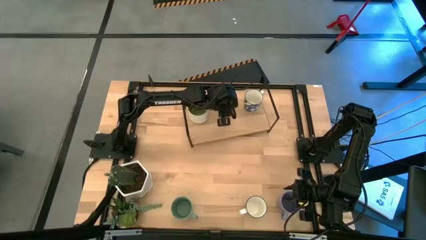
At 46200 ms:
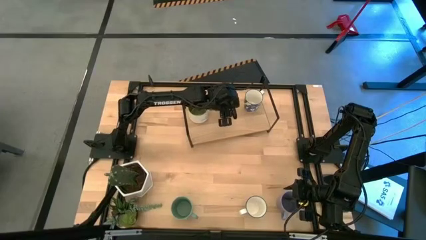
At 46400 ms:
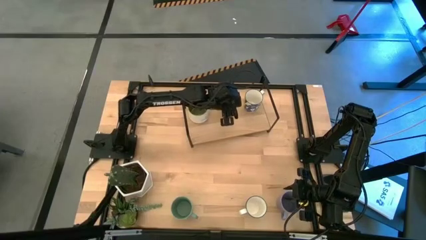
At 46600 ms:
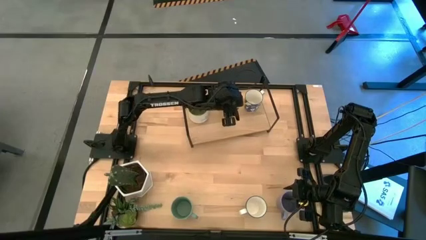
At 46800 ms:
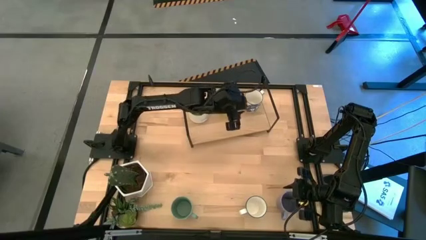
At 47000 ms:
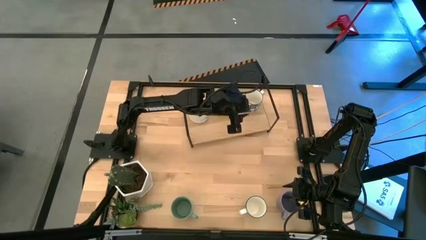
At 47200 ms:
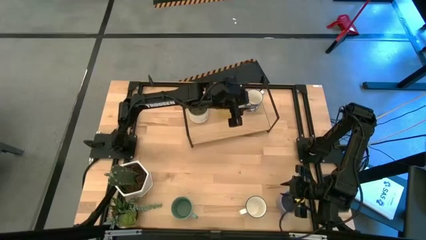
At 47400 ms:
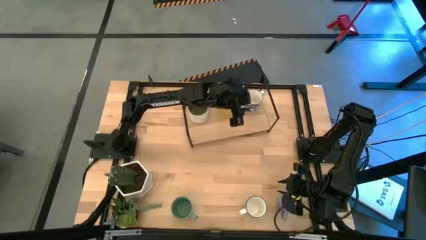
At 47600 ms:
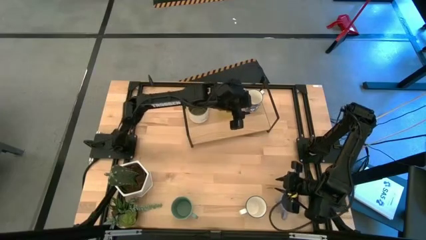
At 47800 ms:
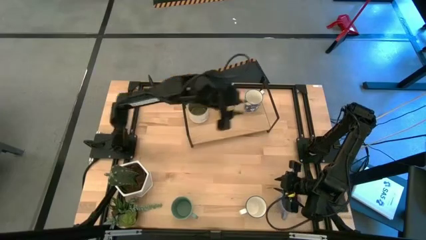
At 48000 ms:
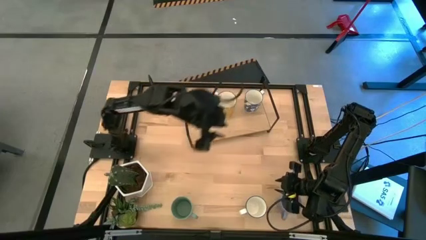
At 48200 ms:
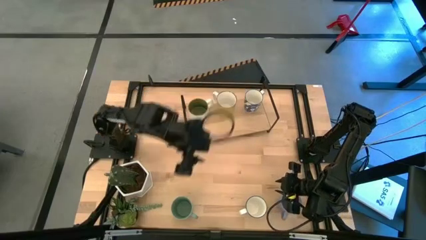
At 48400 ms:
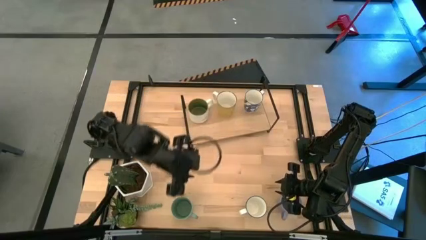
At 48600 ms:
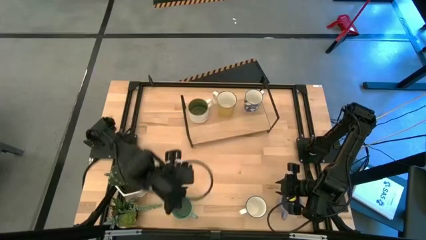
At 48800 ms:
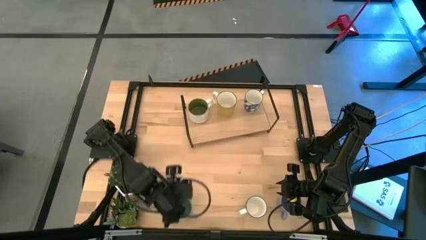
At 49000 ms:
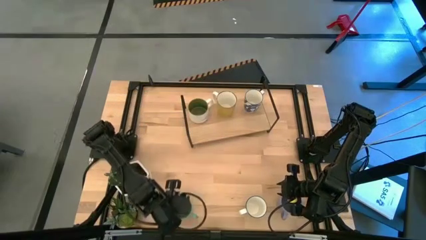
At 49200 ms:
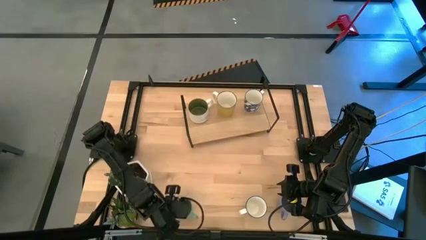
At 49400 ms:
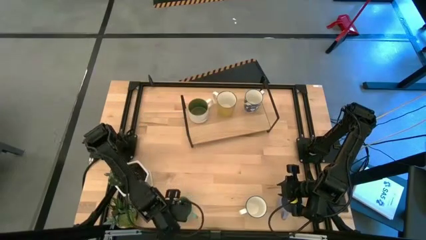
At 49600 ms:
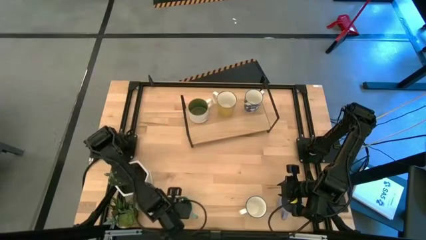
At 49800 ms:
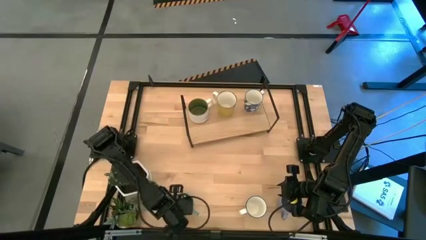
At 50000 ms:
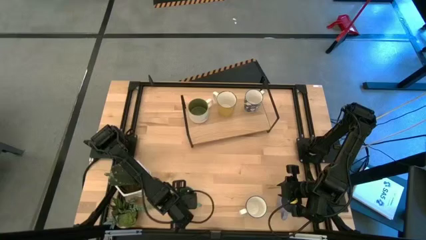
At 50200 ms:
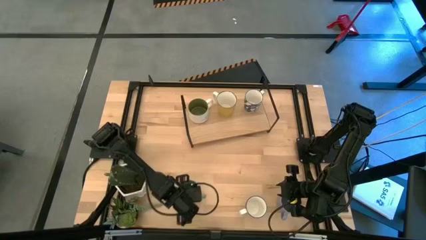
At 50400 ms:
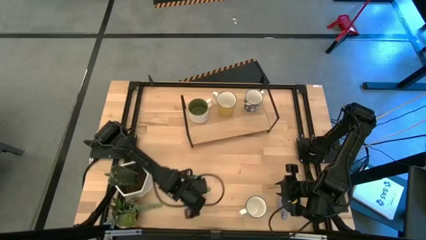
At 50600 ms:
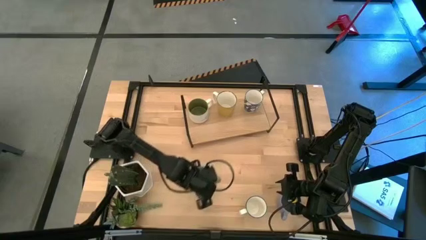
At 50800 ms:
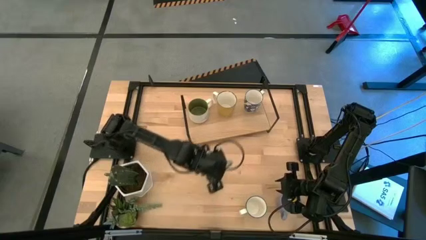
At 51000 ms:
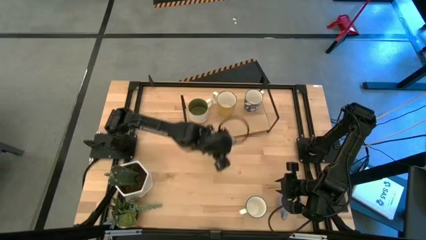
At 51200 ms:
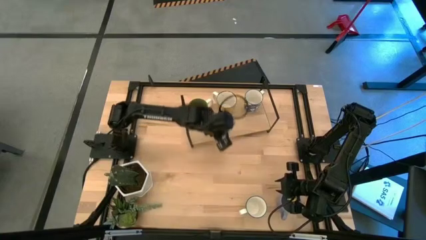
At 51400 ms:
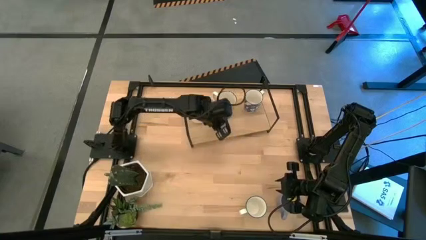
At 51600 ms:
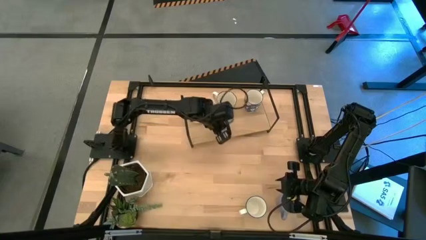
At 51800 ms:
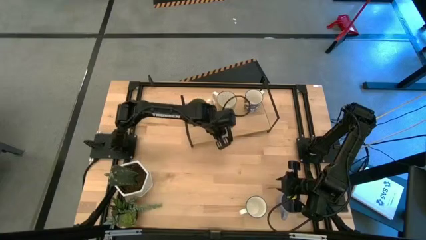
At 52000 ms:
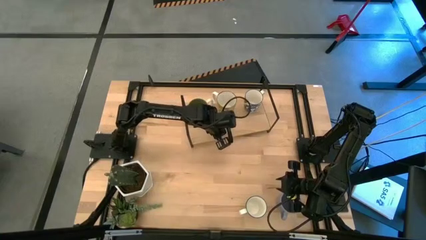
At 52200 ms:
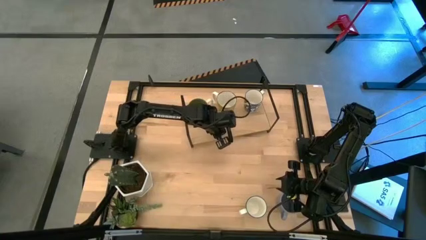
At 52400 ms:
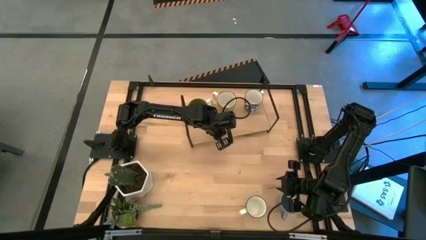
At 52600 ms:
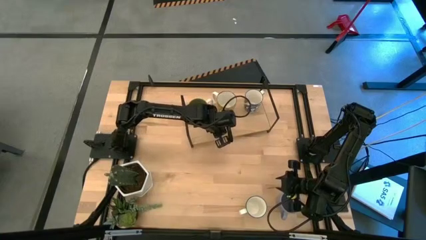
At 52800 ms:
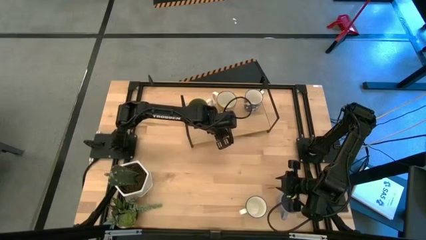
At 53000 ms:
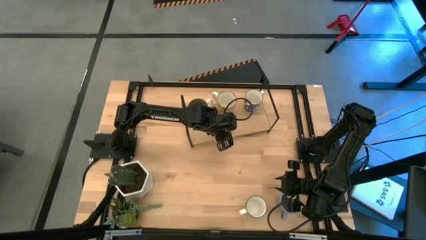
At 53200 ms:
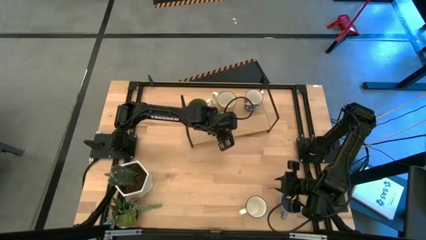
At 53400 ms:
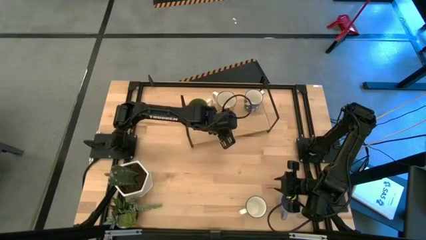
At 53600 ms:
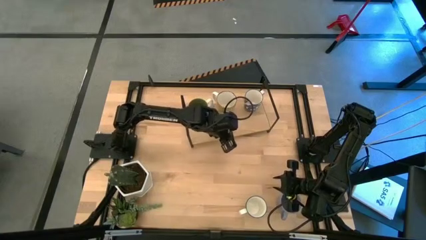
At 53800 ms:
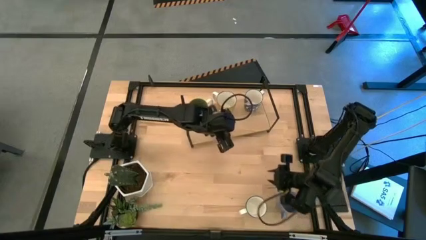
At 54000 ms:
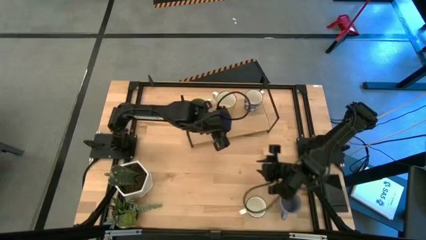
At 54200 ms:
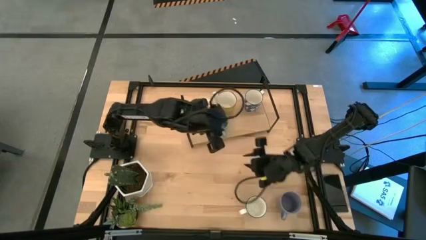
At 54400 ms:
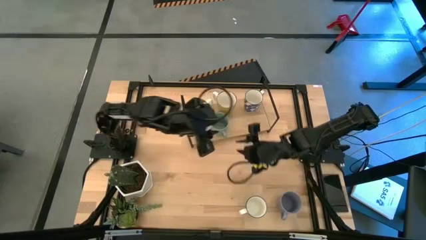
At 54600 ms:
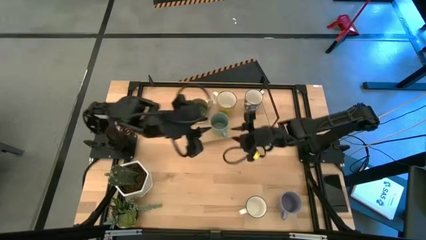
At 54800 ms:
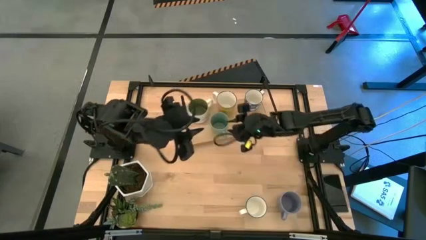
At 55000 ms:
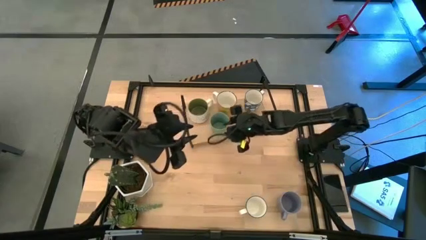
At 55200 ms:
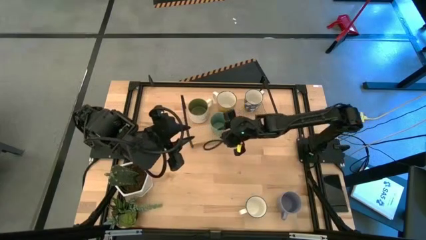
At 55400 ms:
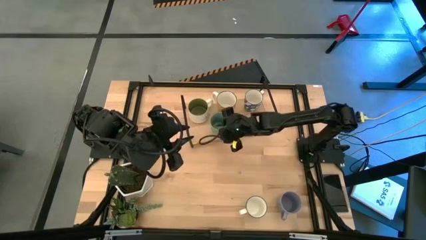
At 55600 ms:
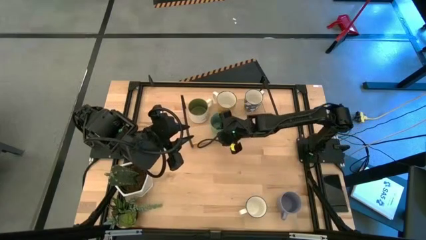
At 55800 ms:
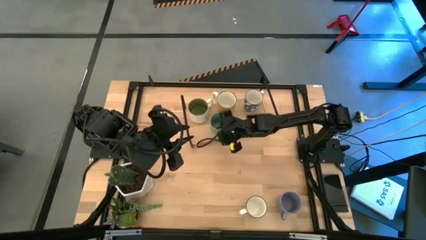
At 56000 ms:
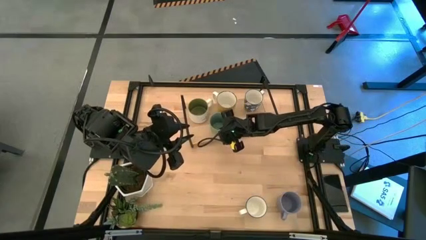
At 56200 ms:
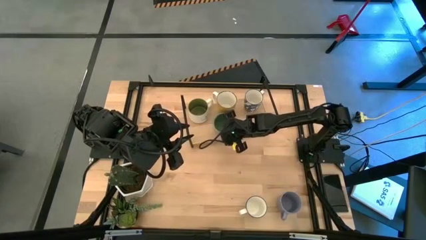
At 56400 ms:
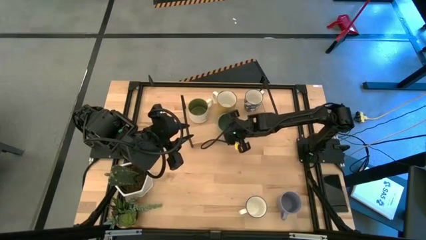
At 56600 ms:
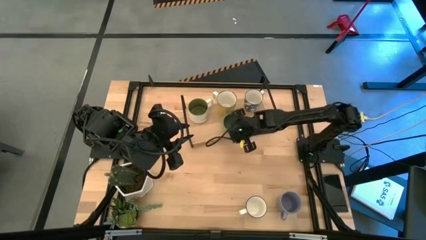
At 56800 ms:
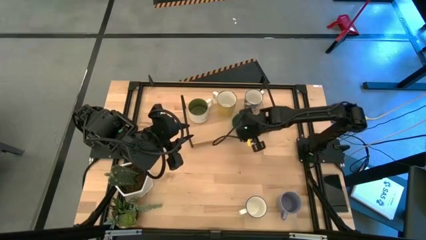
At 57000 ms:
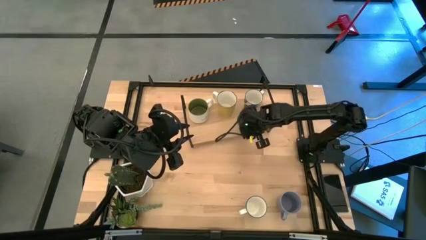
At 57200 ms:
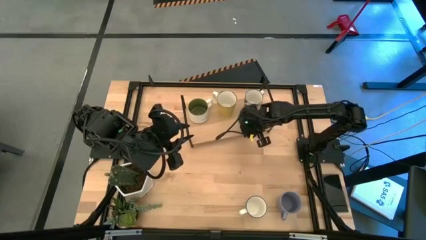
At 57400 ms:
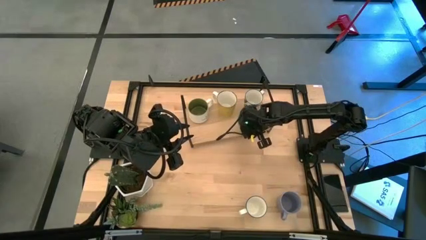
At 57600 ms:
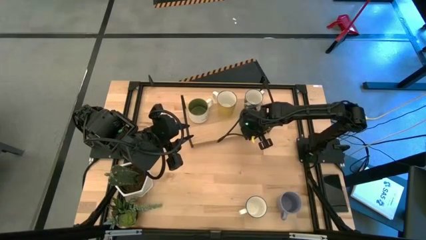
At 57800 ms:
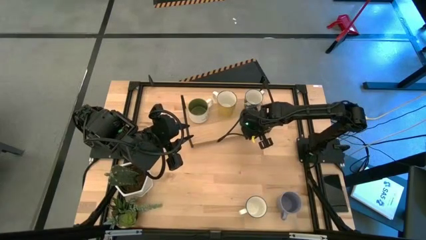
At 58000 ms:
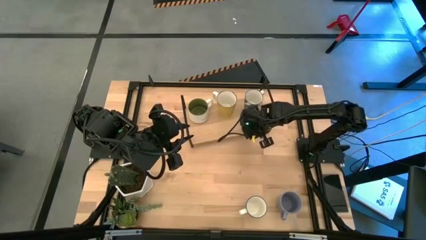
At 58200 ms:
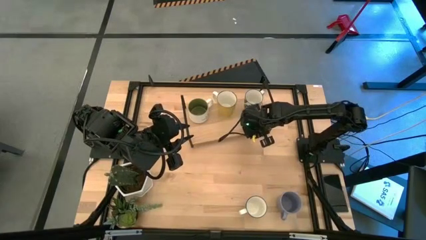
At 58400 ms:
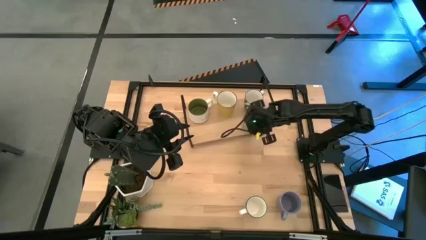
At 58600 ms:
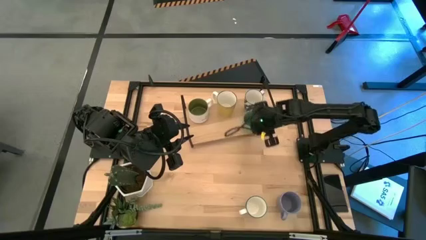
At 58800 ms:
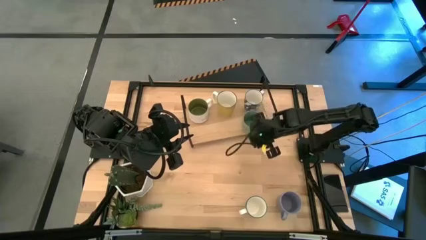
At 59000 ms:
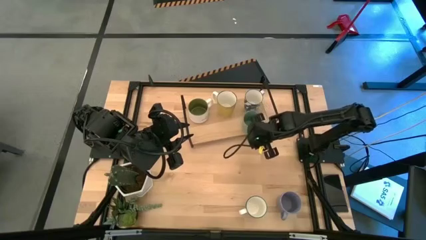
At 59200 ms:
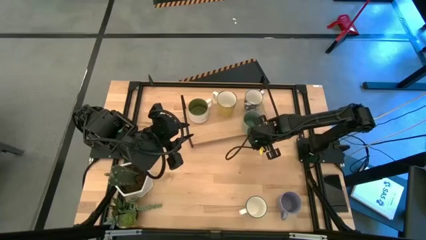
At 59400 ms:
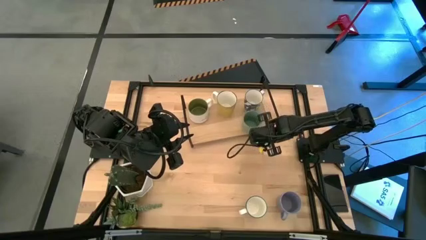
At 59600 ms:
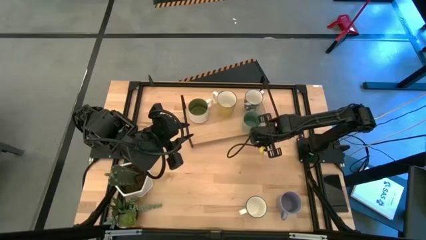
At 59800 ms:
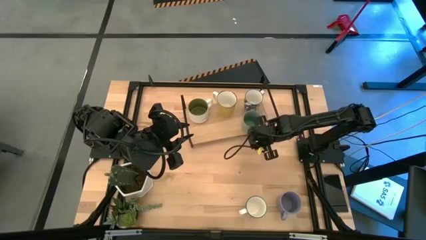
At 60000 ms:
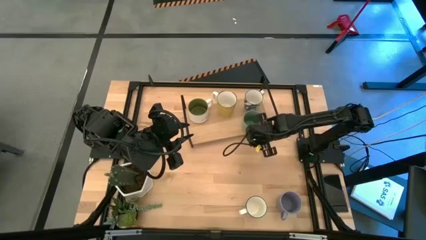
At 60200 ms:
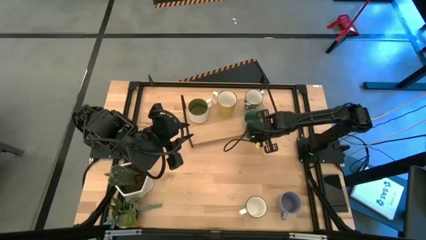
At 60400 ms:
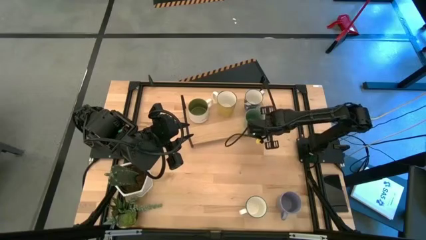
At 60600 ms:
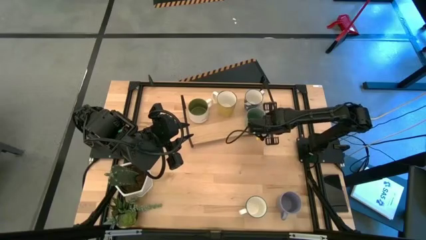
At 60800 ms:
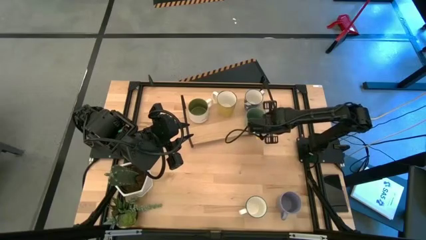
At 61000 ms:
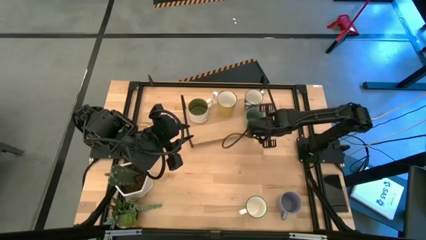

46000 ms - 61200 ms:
Task: Place coffee mugs
Put the green mug on the shelf
